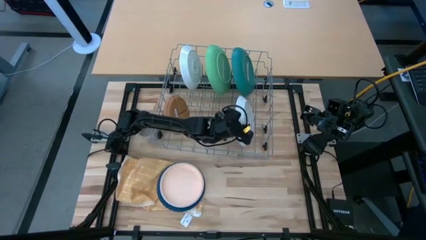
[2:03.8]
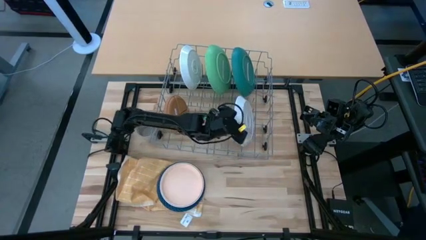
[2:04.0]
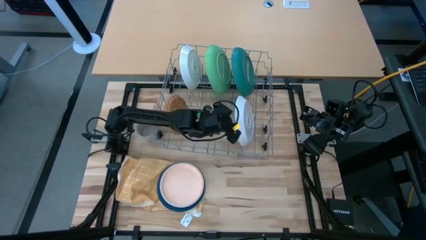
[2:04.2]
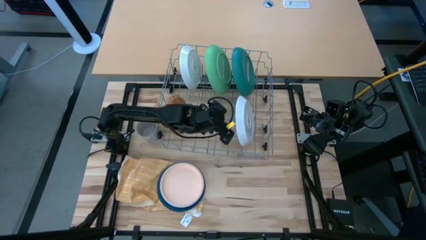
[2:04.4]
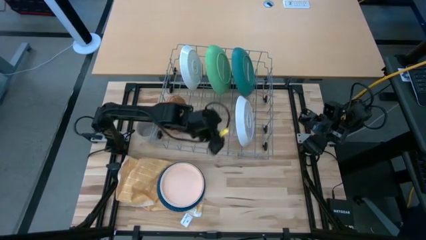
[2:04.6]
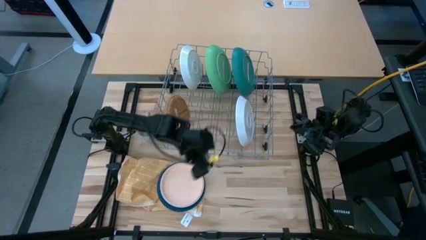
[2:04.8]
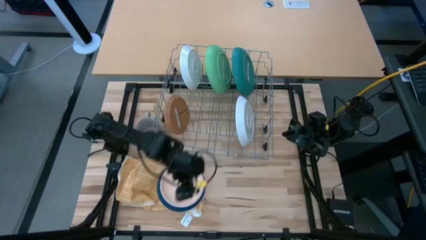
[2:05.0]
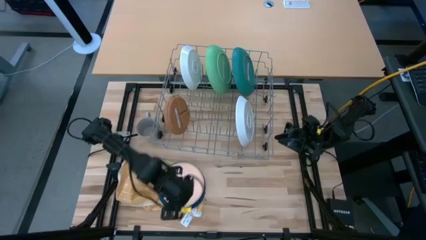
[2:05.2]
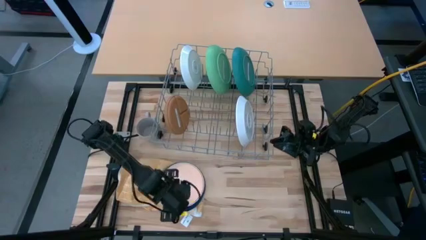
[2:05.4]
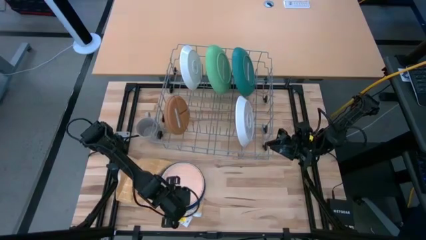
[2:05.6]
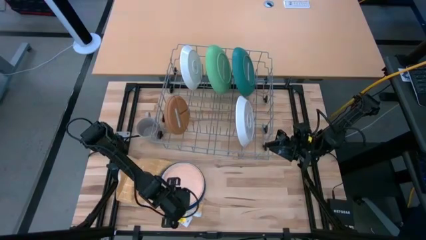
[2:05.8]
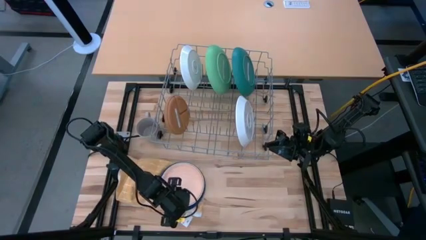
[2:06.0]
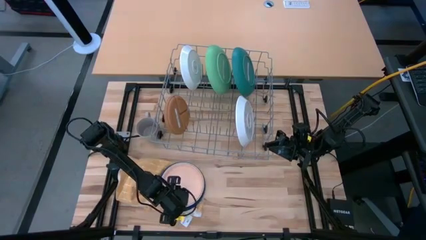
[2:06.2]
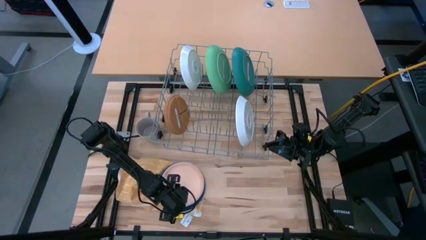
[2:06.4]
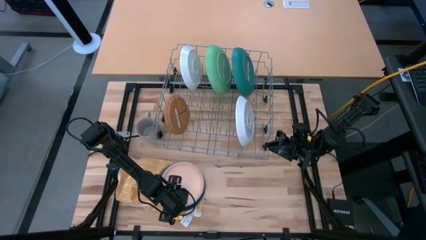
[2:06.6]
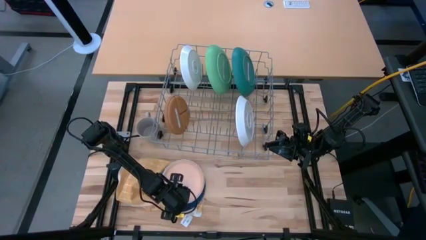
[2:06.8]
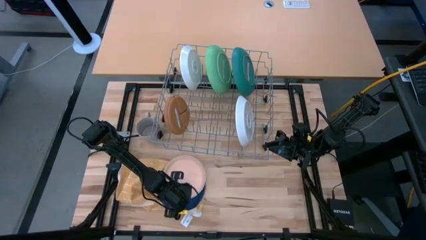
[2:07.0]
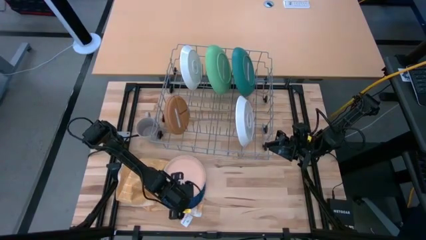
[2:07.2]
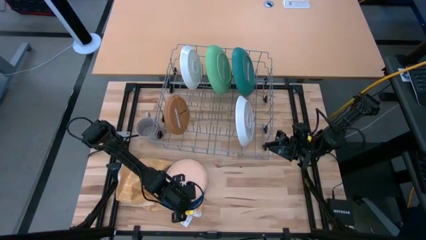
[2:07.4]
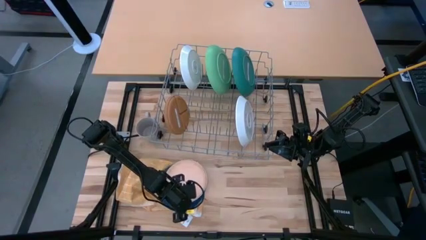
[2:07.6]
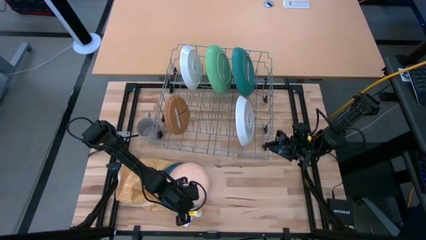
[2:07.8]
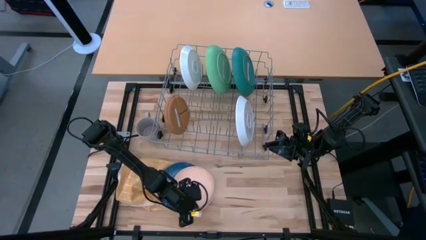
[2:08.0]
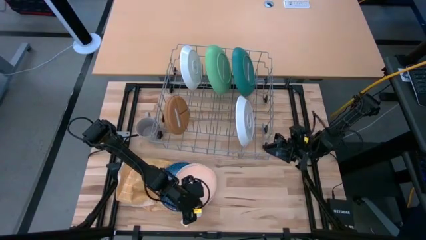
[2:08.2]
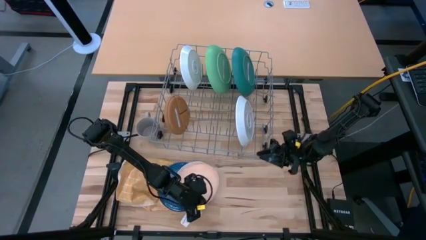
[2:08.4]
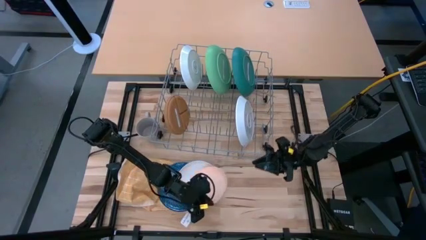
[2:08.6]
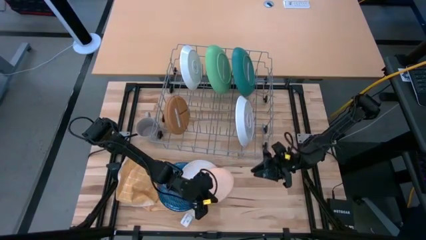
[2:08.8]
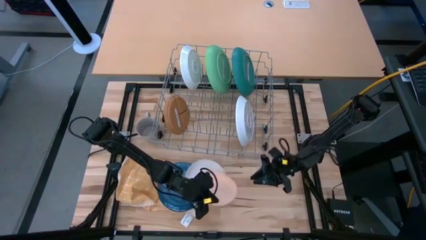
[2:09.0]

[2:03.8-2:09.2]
Task: Sort dishes
Put the orange plate in the dish rack

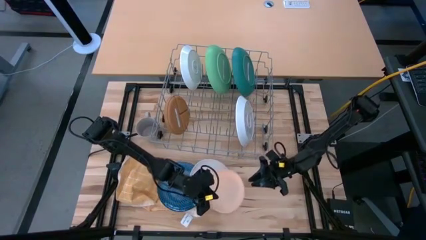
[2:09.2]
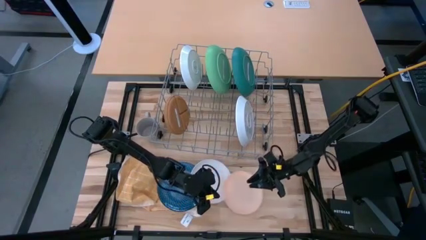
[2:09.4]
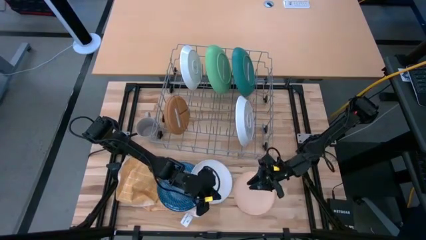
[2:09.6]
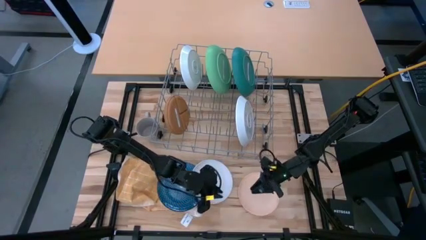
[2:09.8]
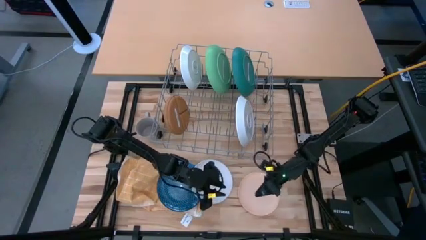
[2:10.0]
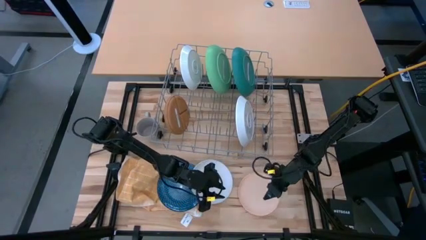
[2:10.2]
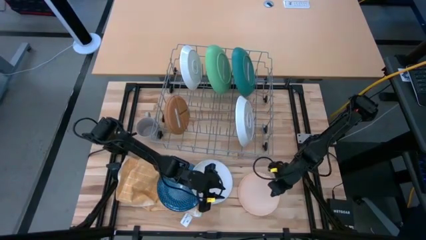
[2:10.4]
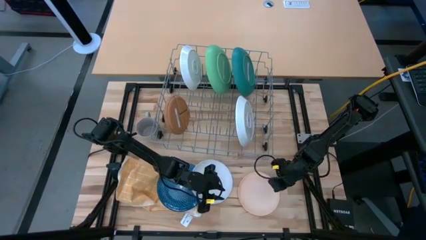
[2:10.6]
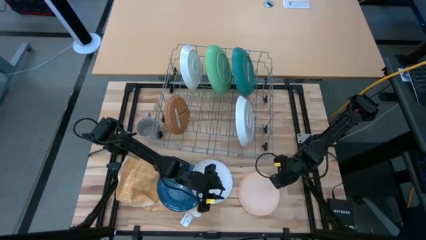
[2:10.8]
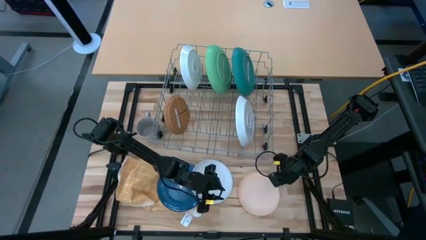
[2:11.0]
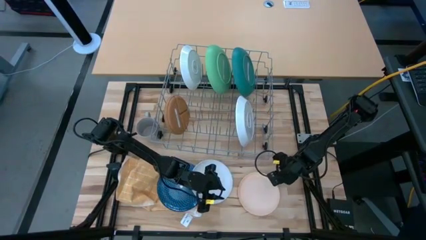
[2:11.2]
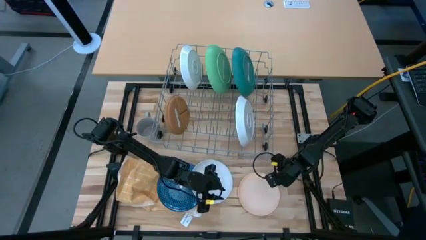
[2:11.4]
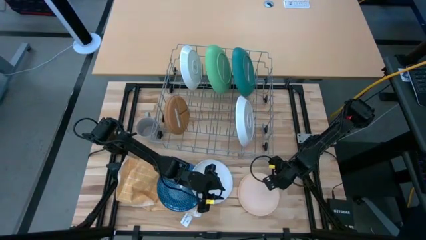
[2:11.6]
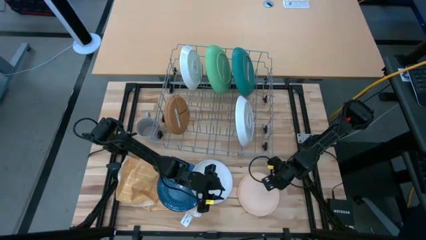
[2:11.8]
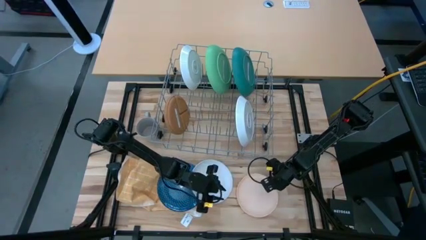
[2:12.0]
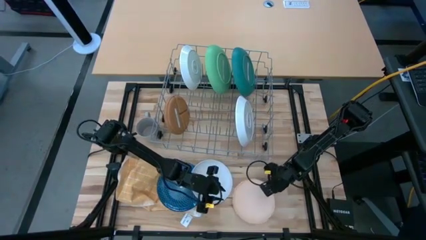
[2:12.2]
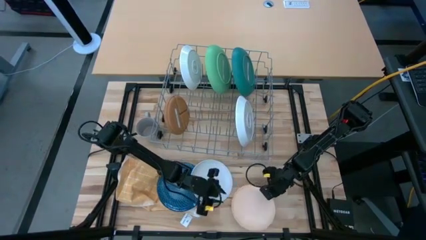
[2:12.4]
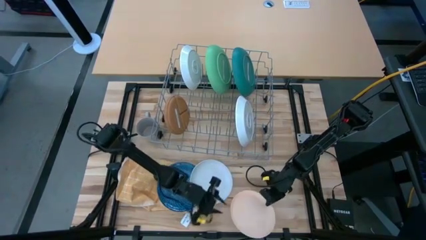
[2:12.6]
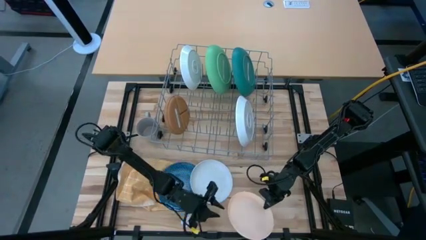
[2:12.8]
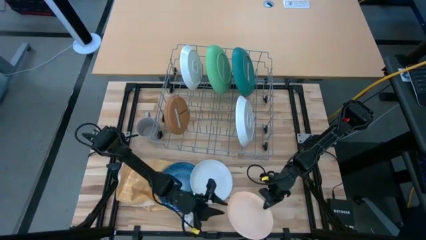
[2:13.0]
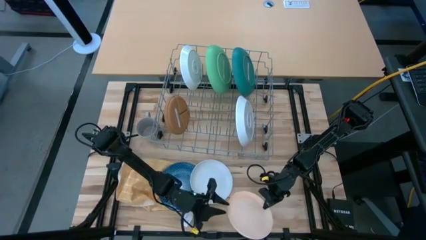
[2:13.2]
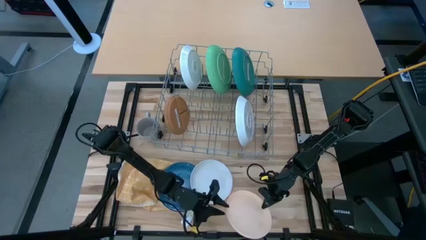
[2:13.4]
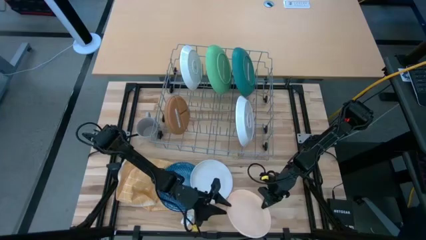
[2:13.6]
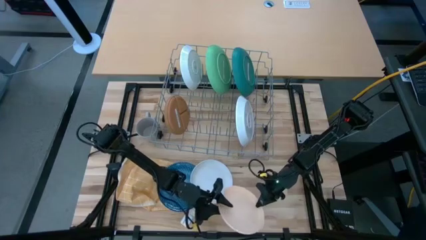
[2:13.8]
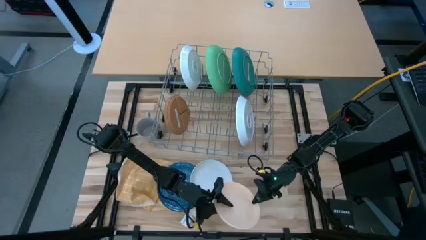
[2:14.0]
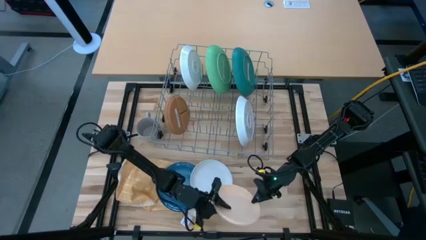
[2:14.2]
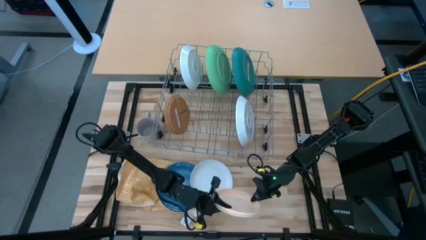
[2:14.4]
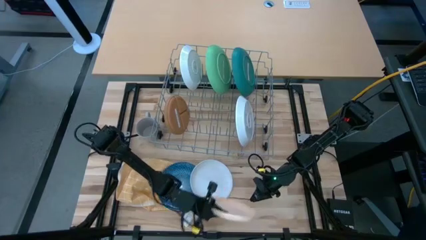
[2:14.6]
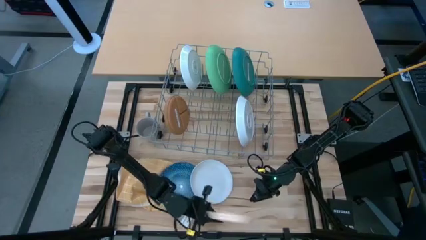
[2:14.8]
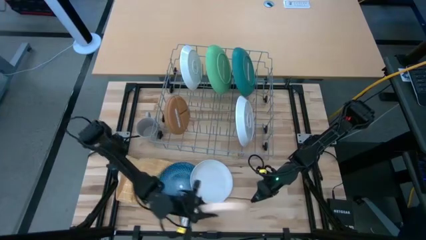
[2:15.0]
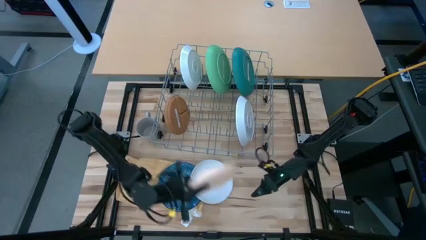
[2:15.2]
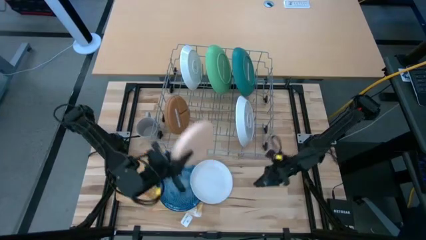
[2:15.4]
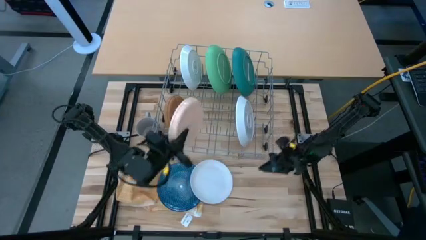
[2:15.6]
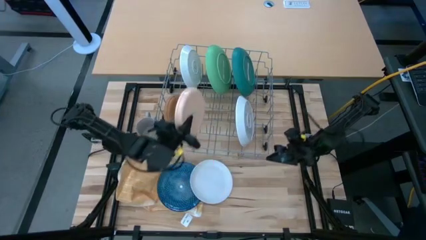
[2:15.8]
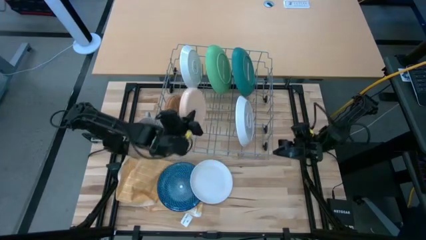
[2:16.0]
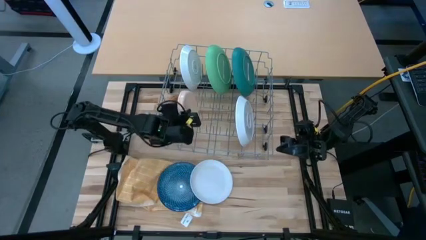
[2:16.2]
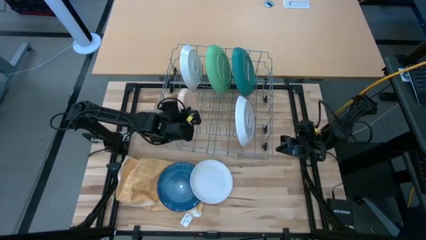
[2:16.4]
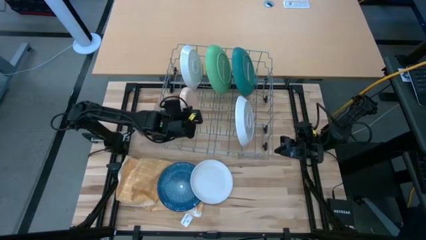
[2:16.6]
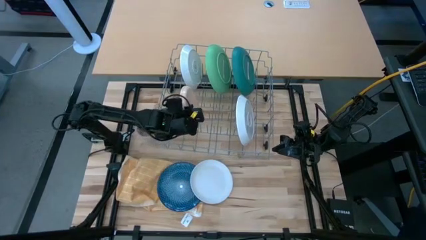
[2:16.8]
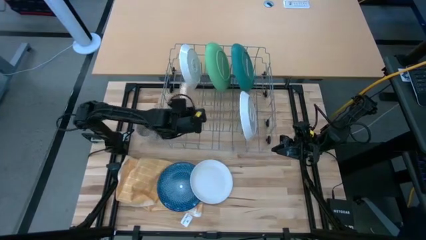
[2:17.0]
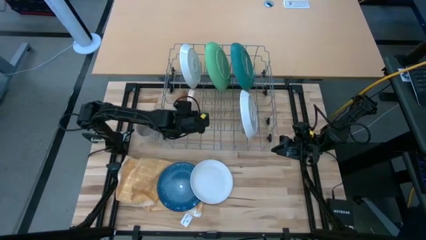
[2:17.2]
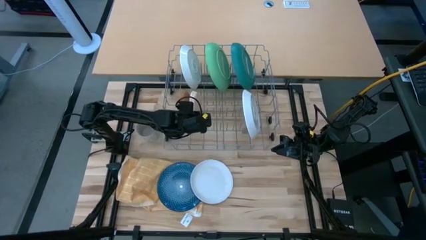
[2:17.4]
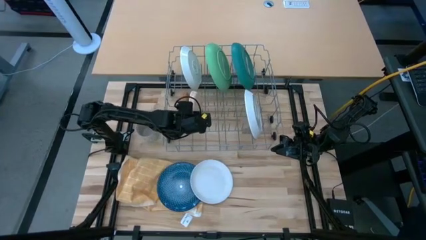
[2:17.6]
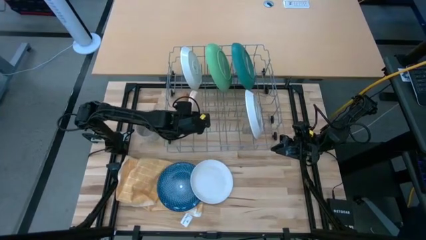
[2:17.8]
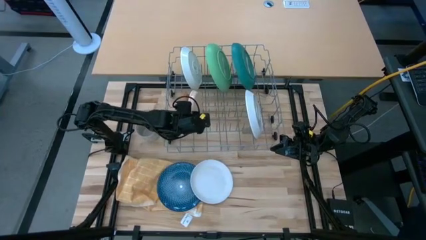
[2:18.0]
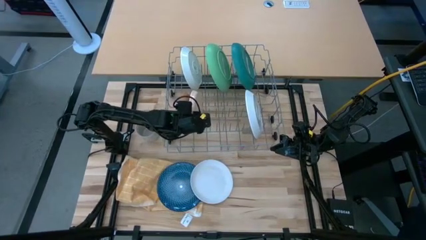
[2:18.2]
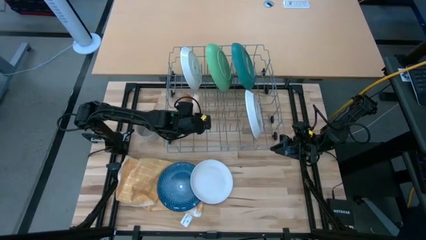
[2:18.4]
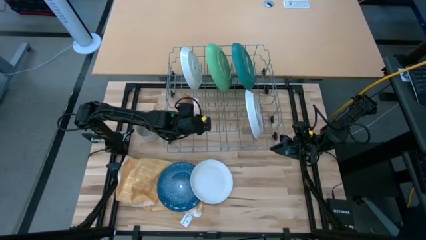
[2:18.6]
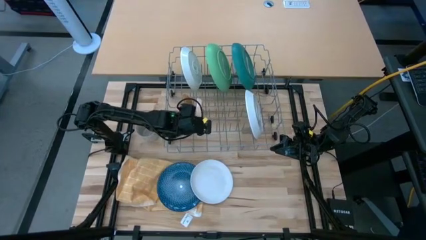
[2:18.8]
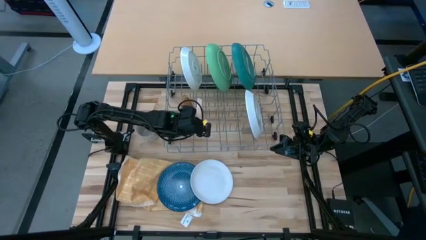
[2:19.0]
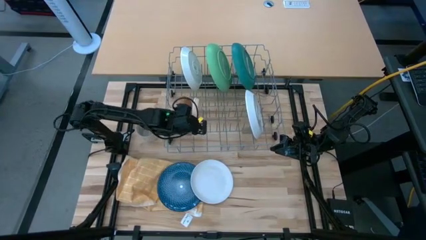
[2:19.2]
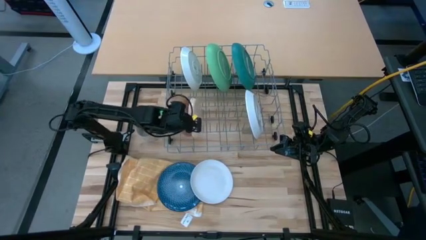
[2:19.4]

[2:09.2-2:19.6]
Put the orange plate in the dish rack
